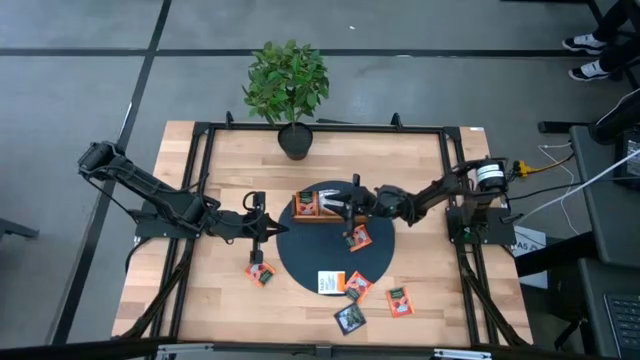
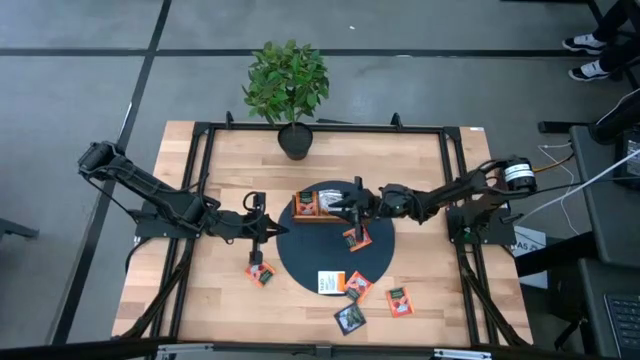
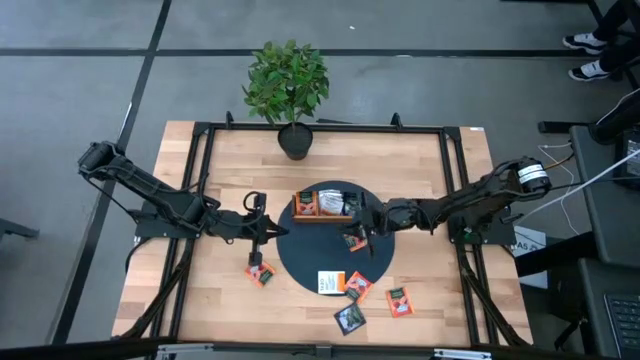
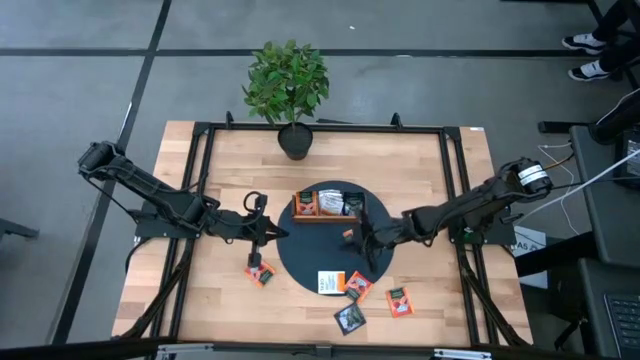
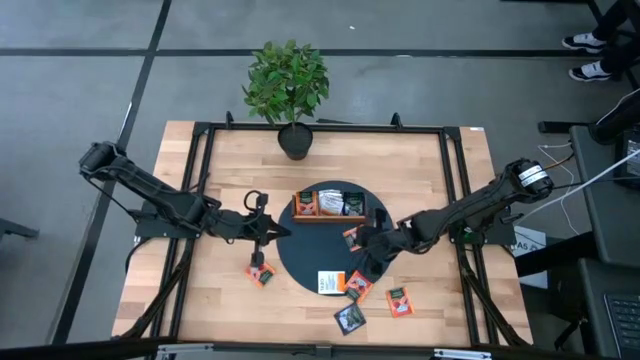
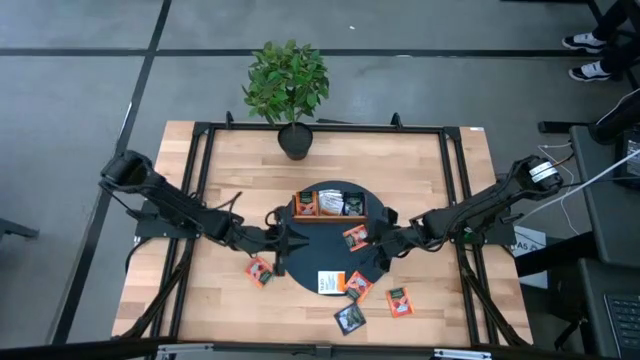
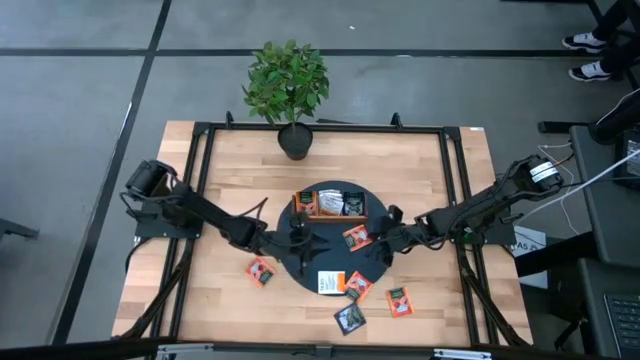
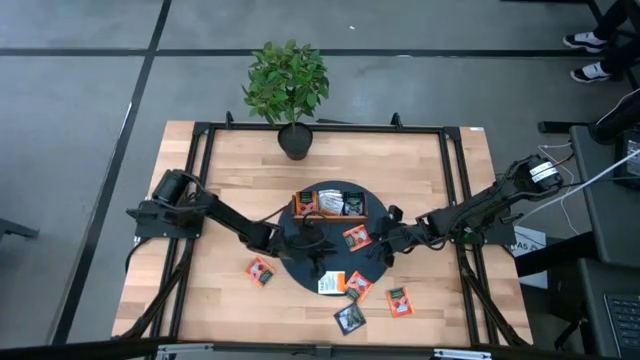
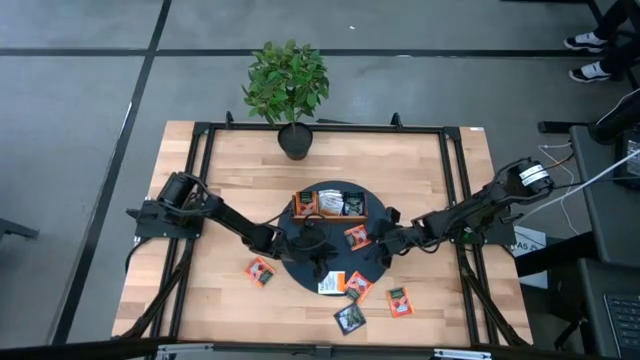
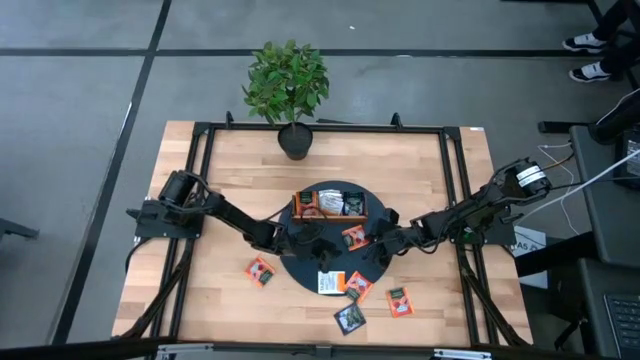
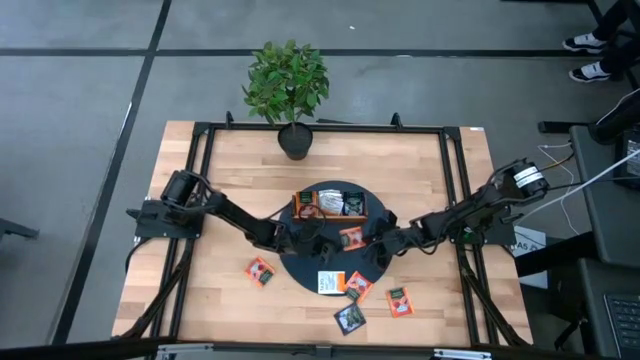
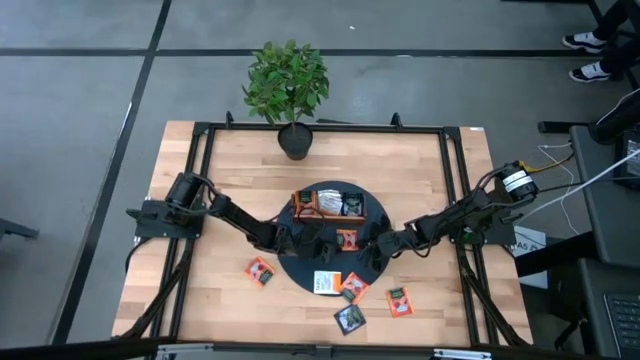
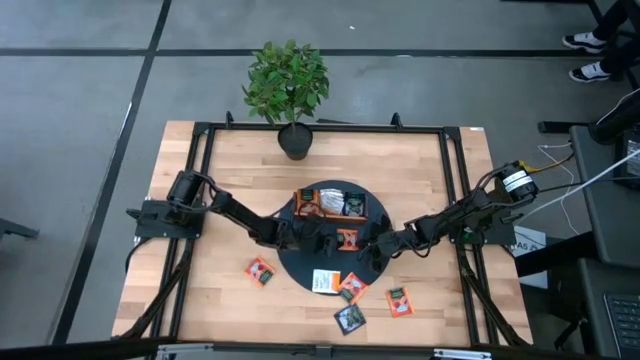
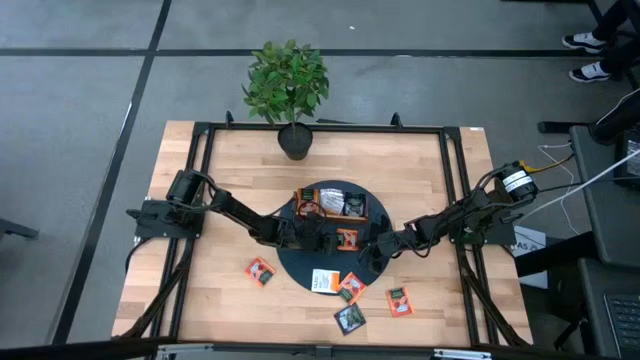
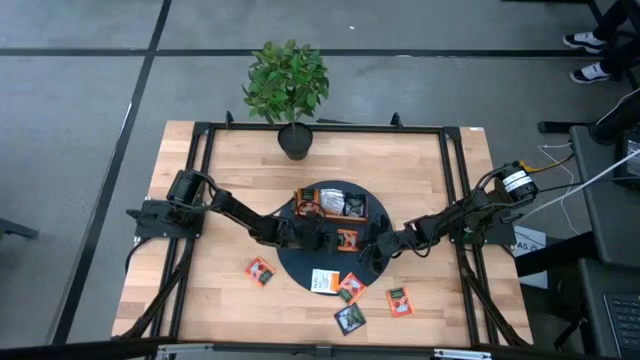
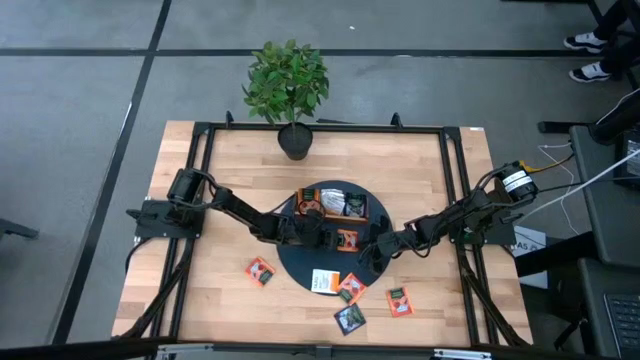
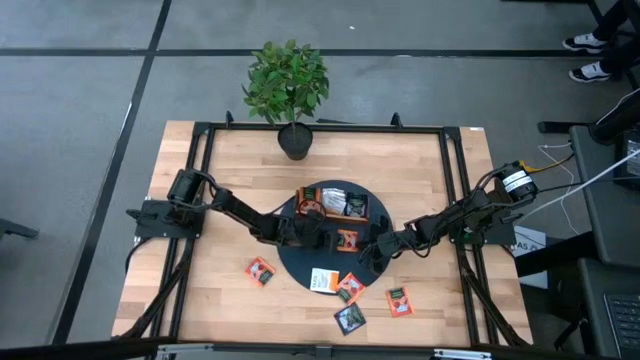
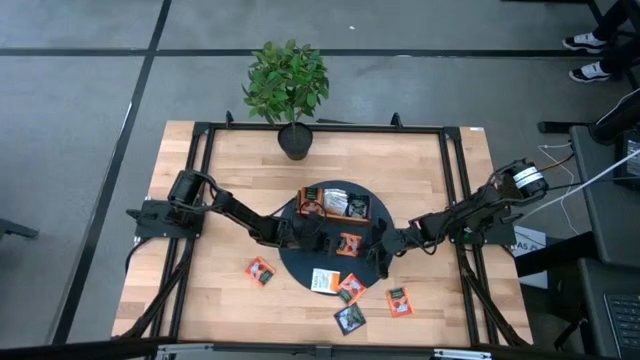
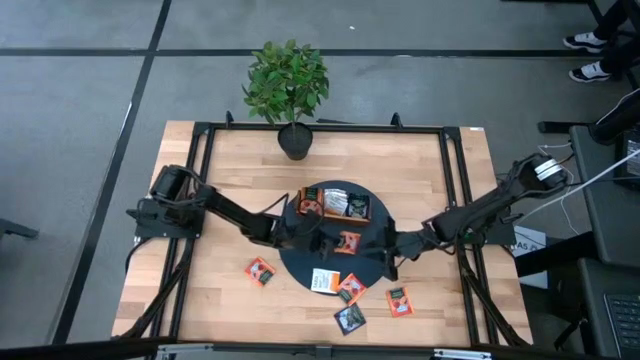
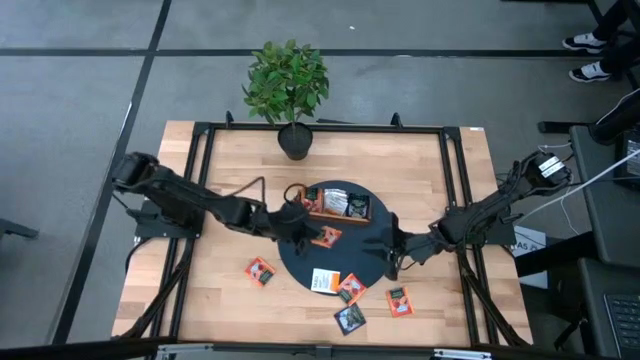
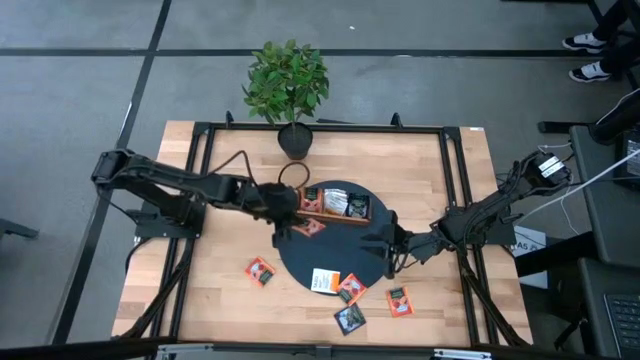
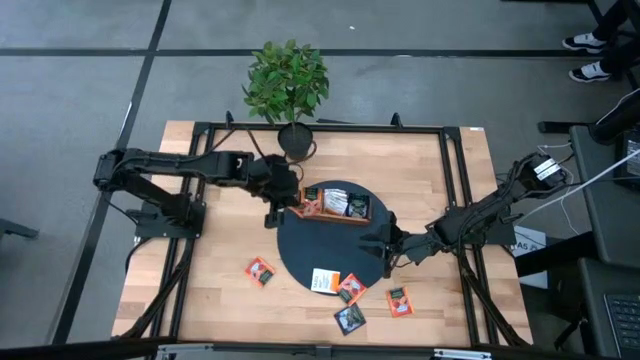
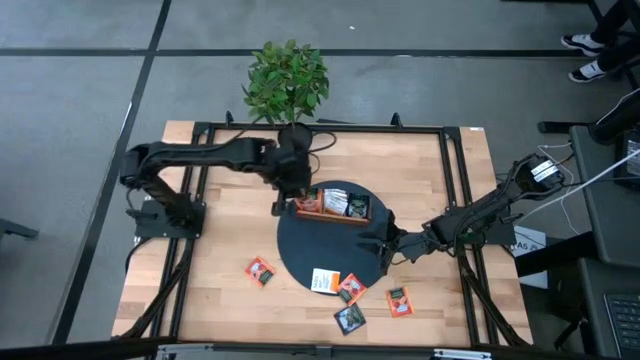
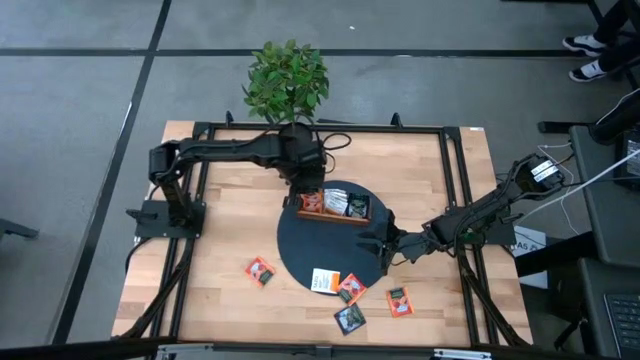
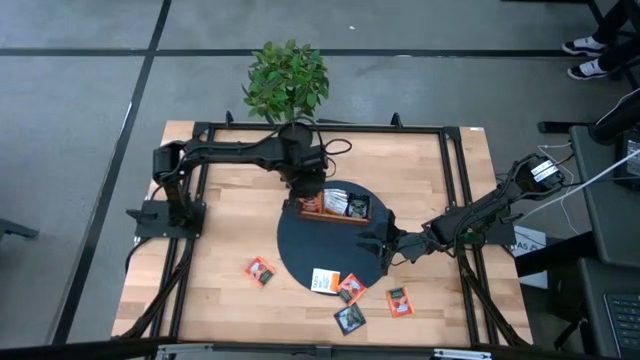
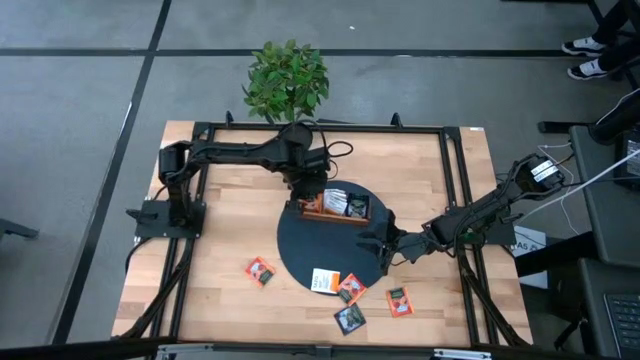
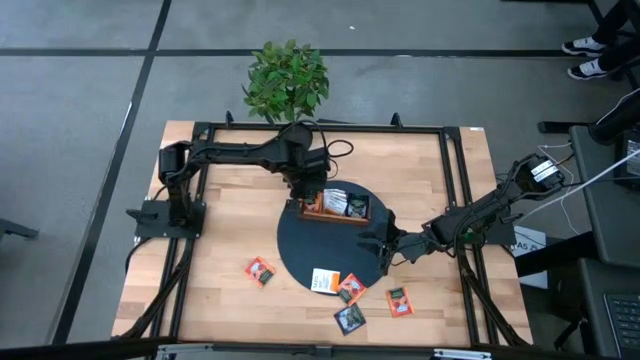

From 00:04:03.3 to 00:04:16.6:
Task: Pick & Place Tea
Put the orange tea bag into the left side of the wooden organizer

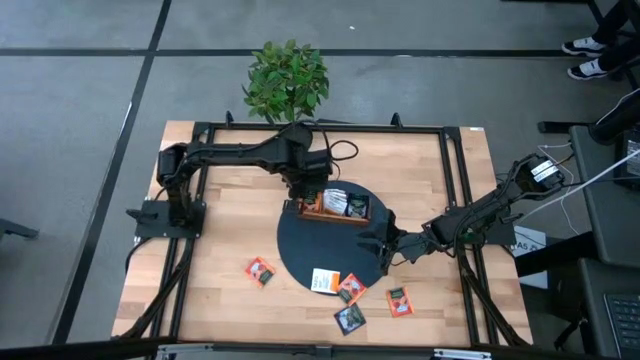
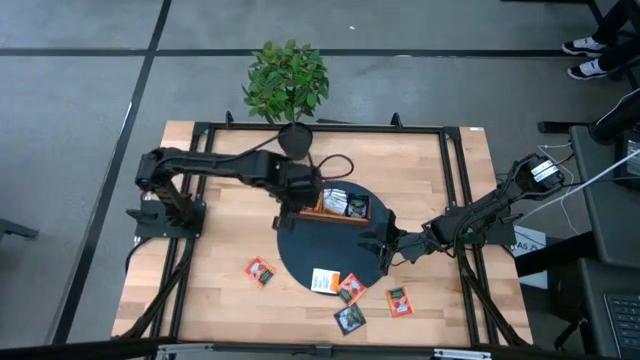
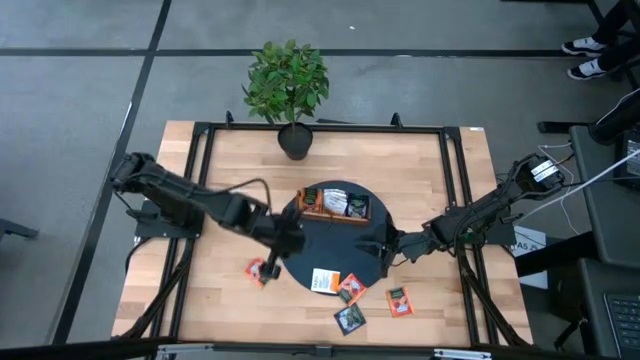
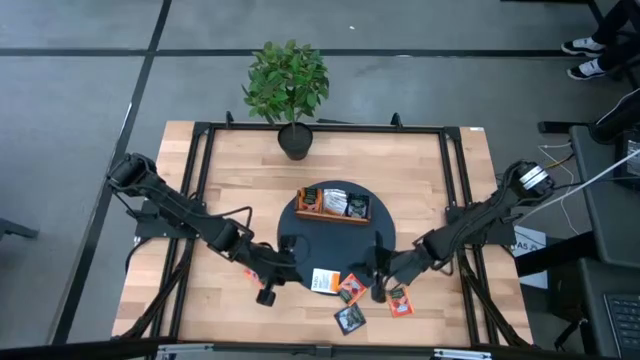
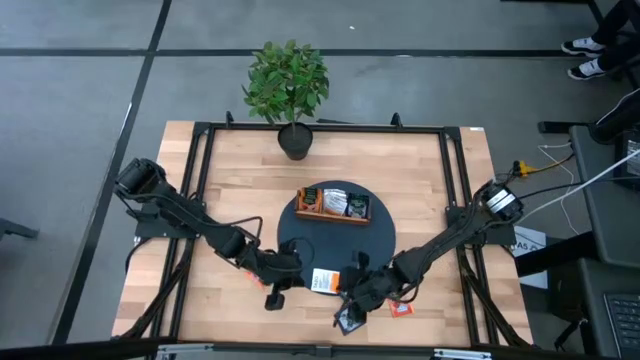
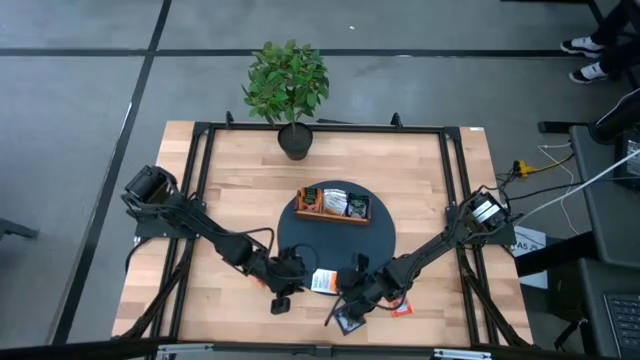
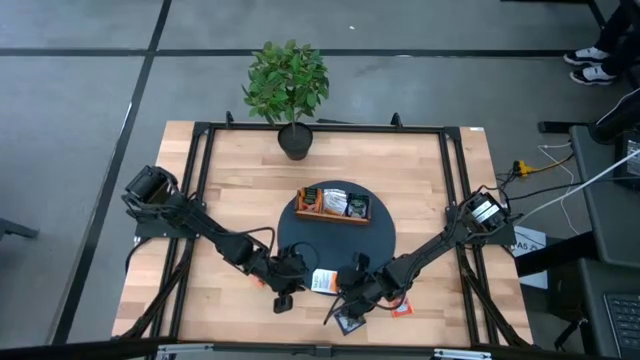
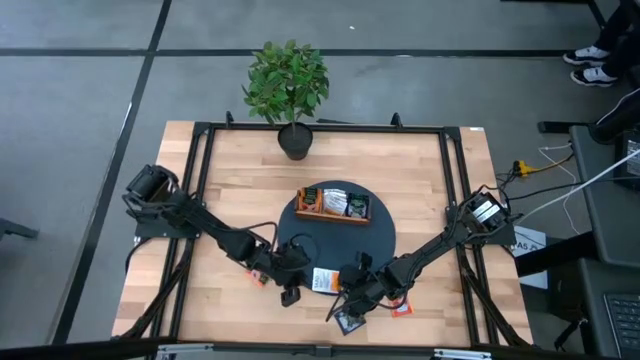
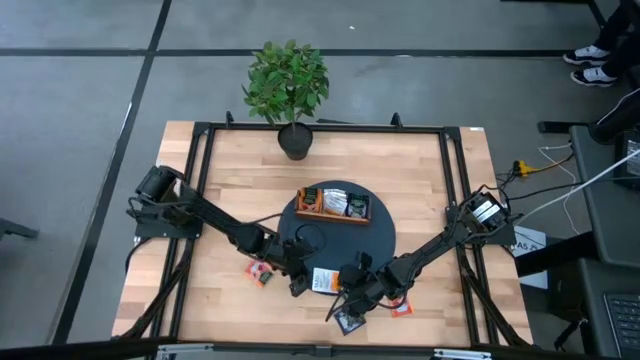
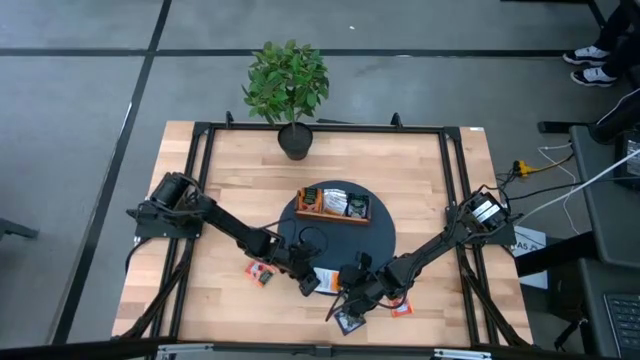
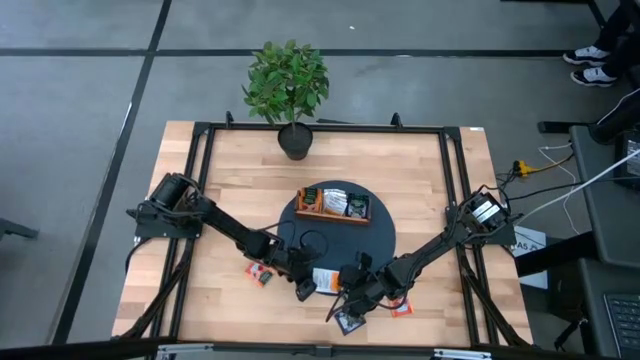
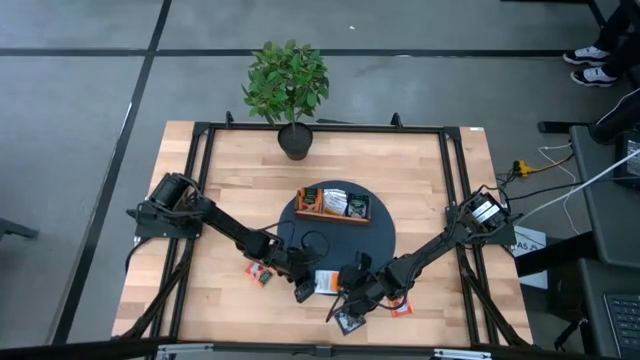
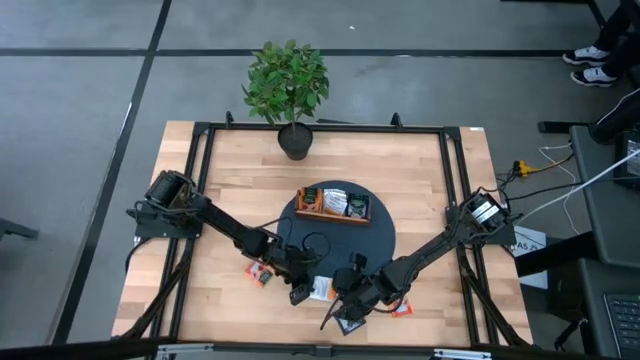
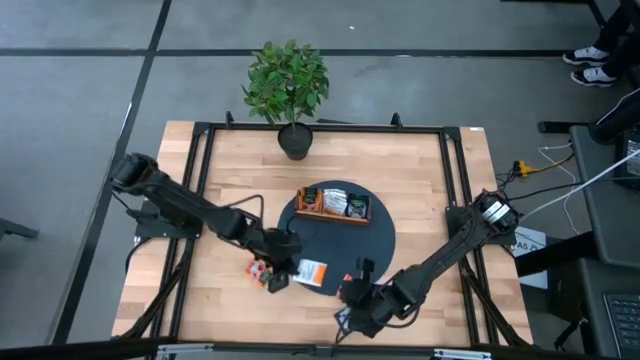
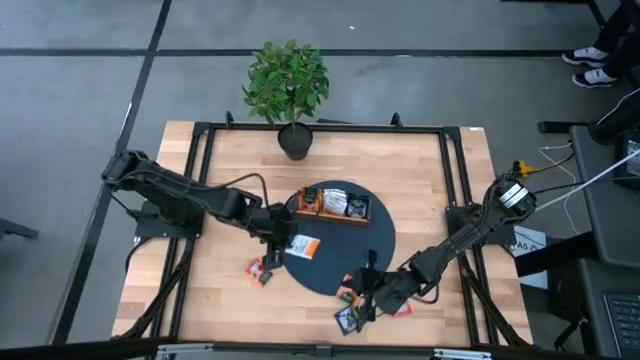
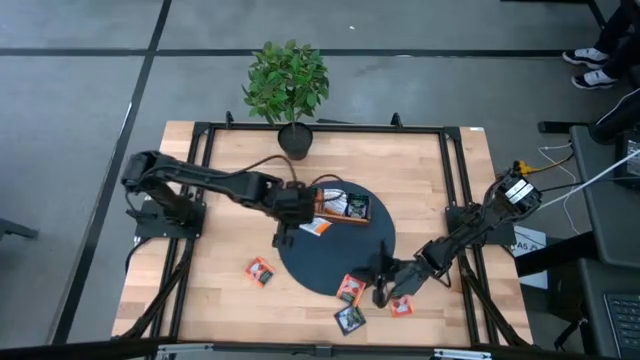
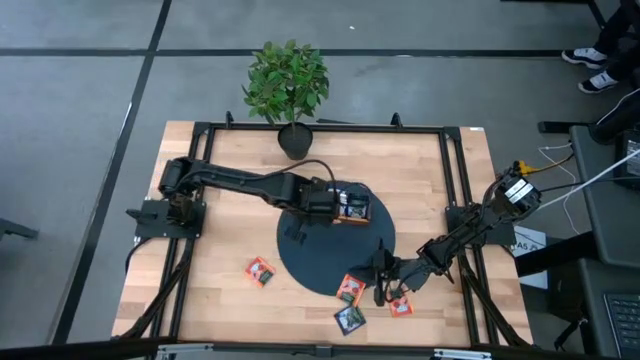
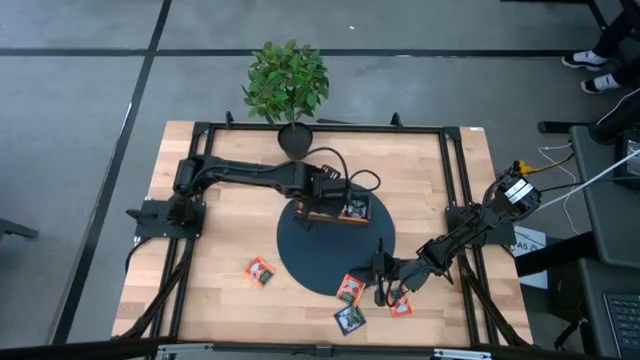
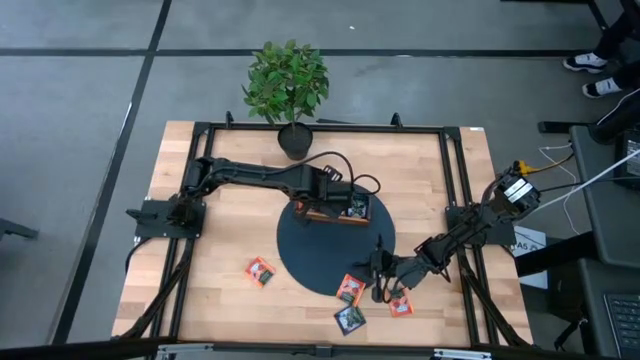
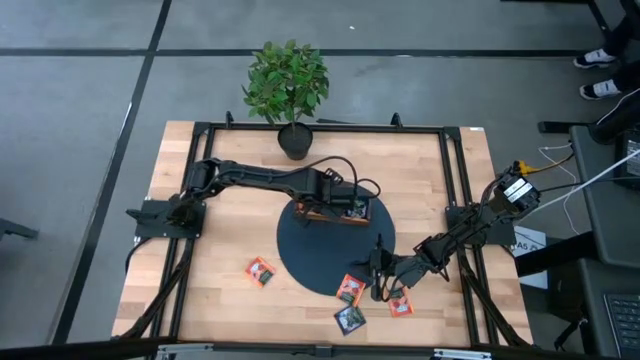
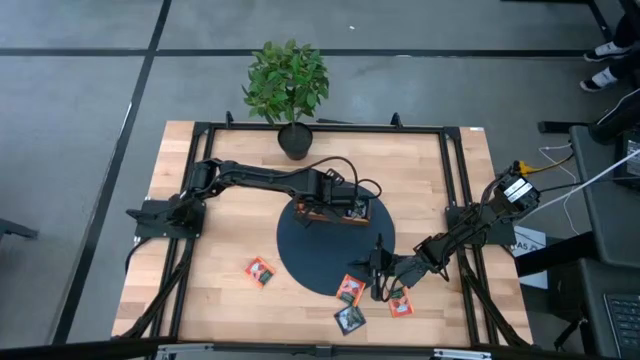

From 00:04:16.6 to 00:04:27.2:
Put the white tea bag into the middle of the wooden organizer
